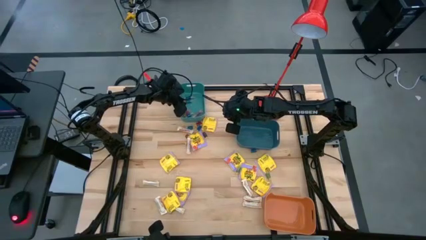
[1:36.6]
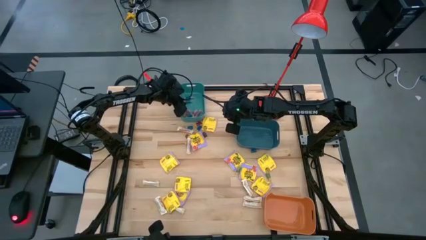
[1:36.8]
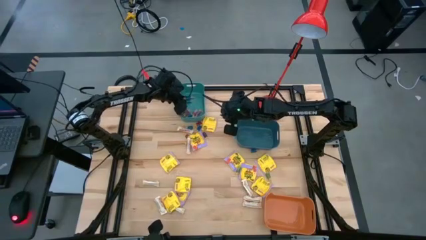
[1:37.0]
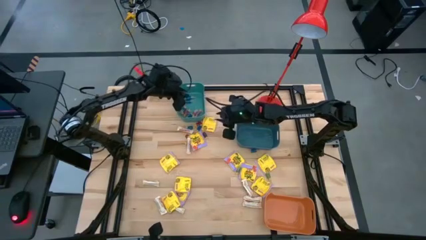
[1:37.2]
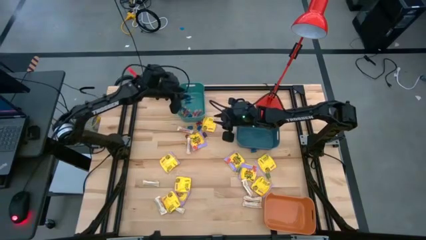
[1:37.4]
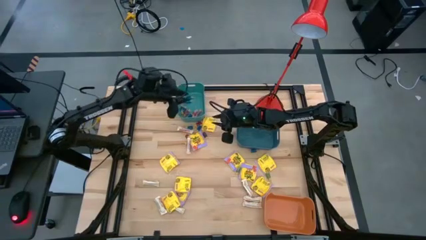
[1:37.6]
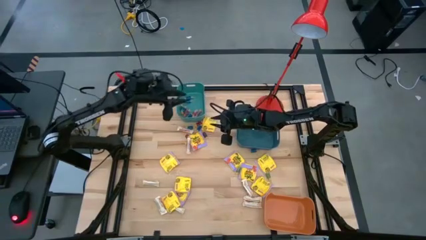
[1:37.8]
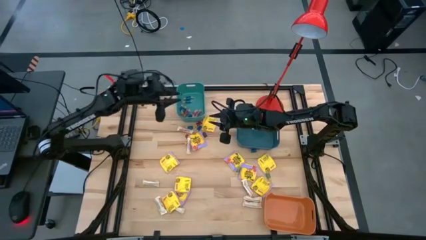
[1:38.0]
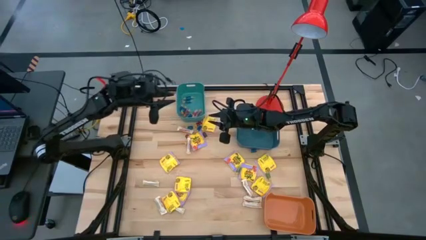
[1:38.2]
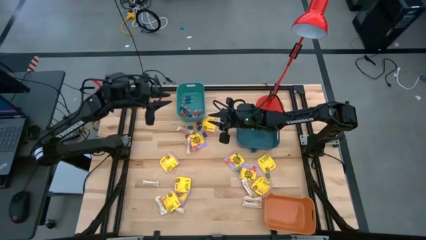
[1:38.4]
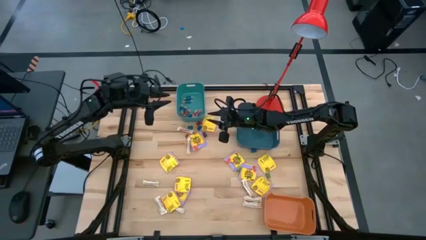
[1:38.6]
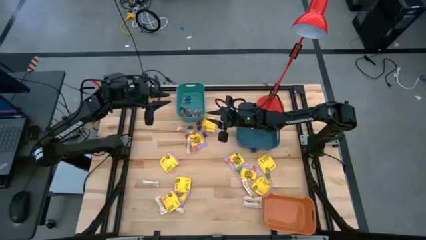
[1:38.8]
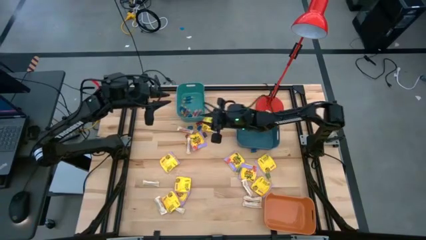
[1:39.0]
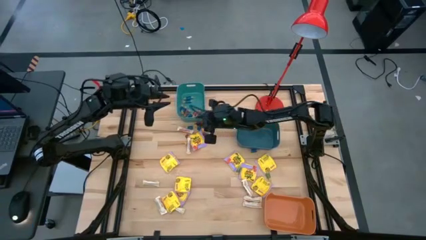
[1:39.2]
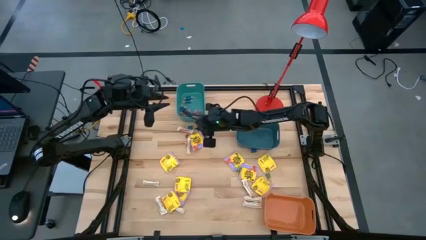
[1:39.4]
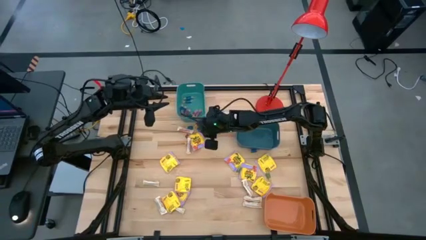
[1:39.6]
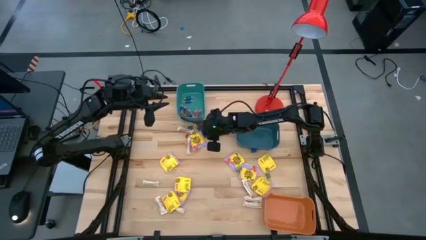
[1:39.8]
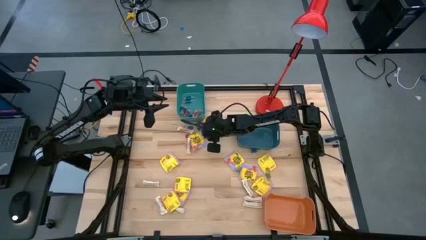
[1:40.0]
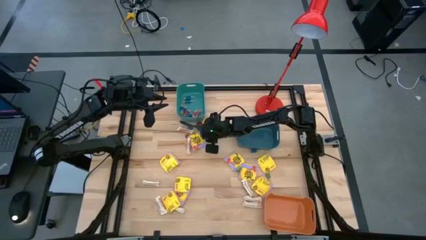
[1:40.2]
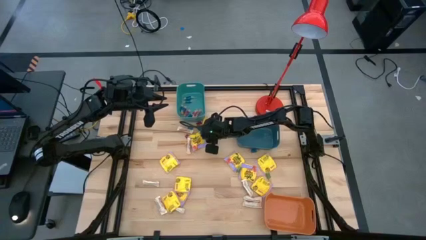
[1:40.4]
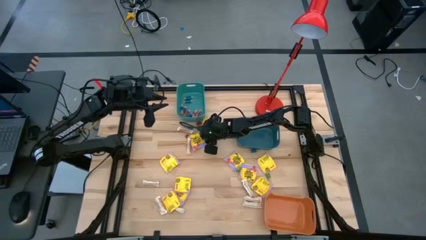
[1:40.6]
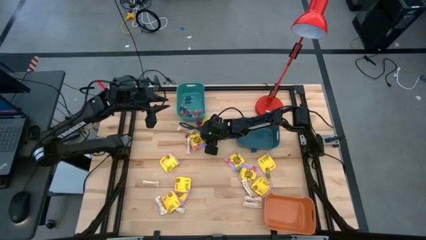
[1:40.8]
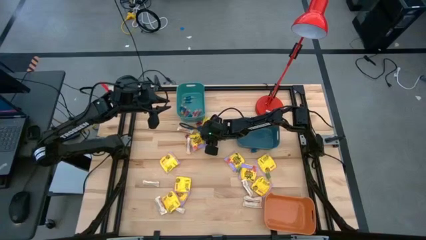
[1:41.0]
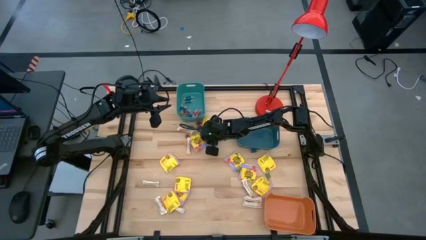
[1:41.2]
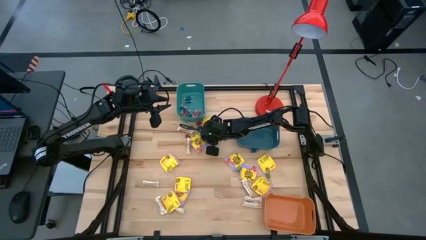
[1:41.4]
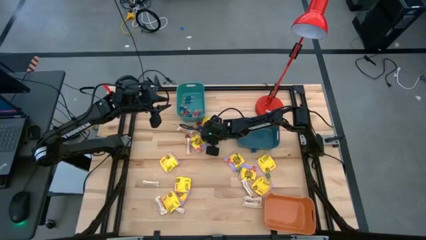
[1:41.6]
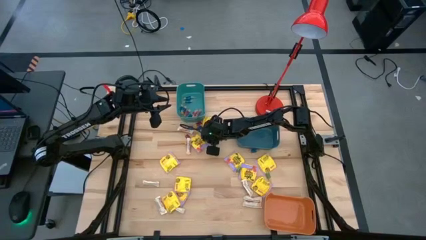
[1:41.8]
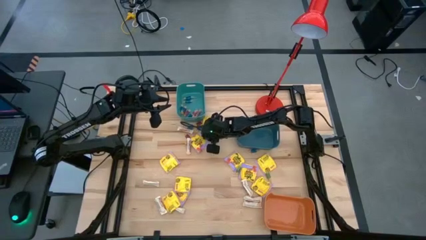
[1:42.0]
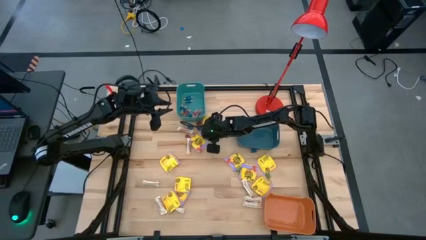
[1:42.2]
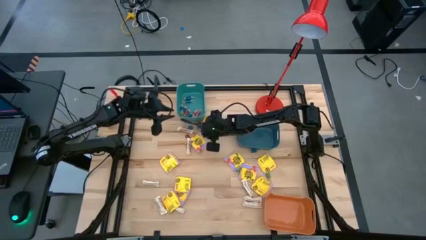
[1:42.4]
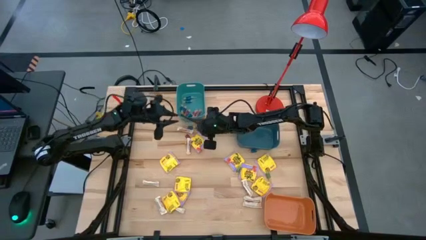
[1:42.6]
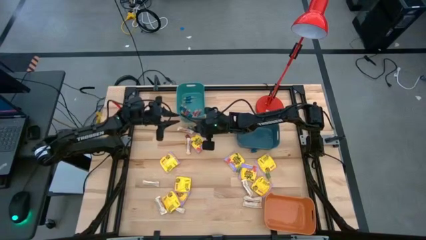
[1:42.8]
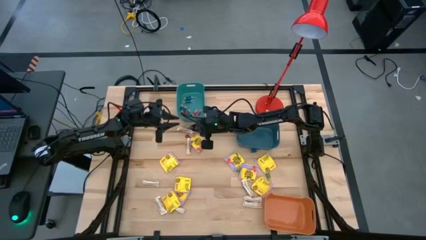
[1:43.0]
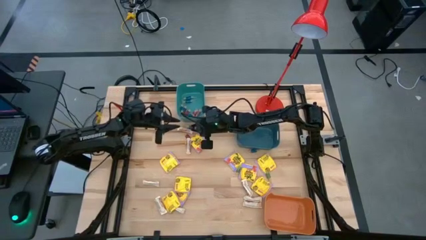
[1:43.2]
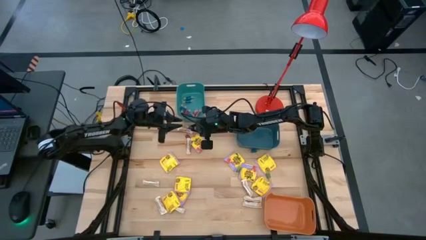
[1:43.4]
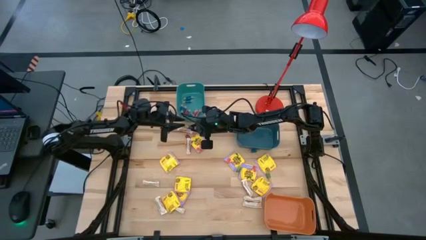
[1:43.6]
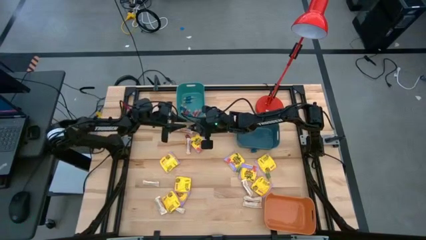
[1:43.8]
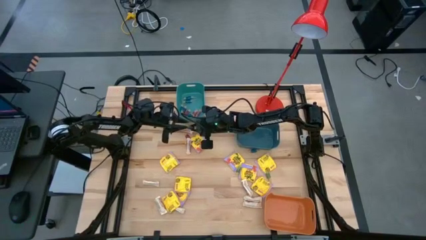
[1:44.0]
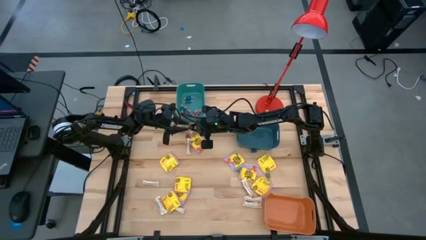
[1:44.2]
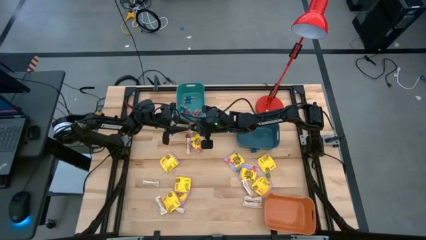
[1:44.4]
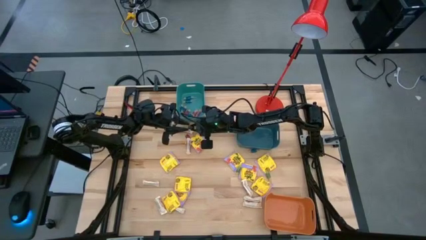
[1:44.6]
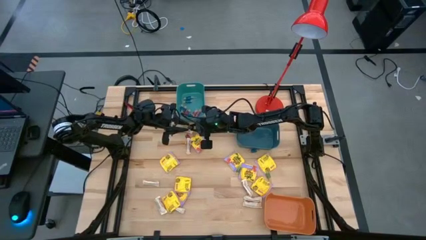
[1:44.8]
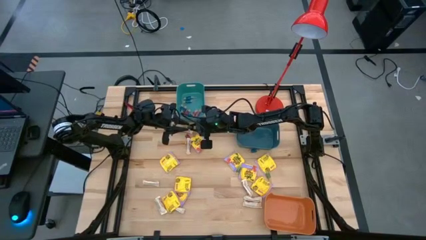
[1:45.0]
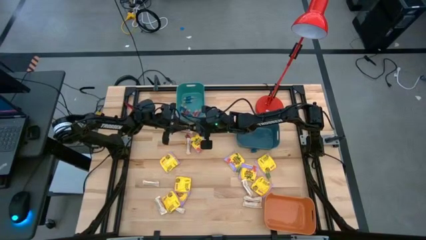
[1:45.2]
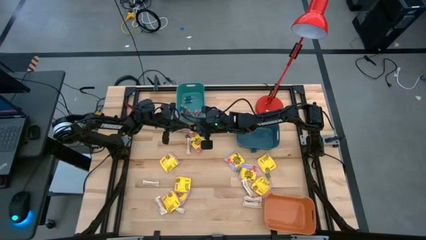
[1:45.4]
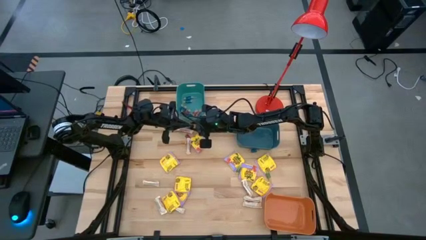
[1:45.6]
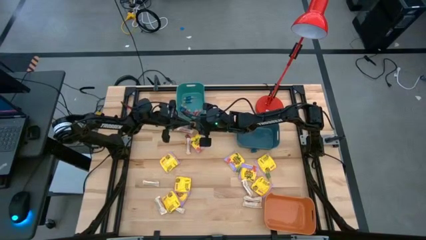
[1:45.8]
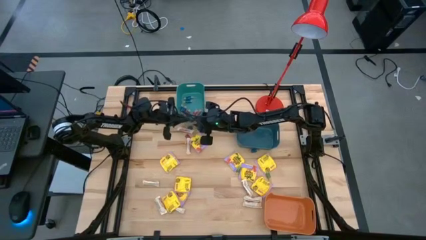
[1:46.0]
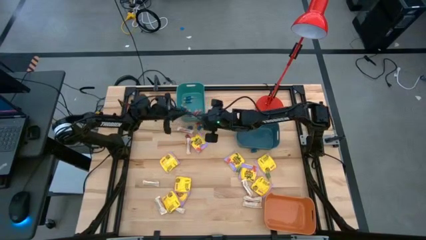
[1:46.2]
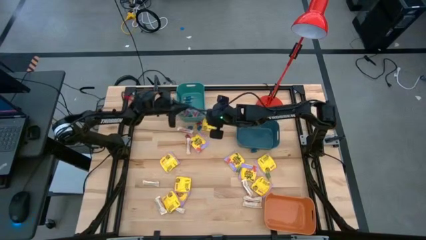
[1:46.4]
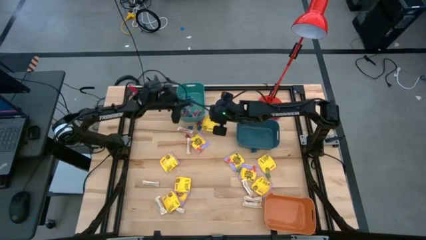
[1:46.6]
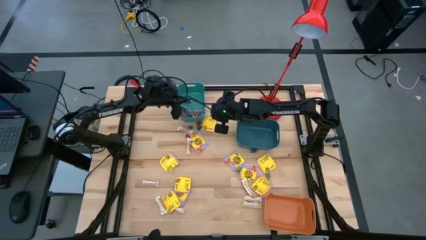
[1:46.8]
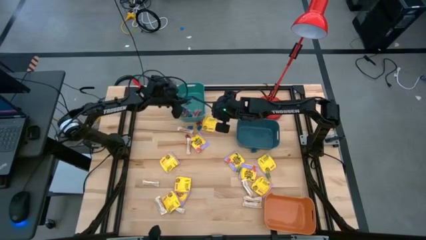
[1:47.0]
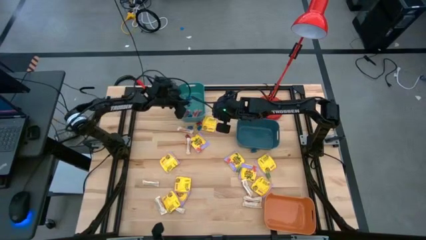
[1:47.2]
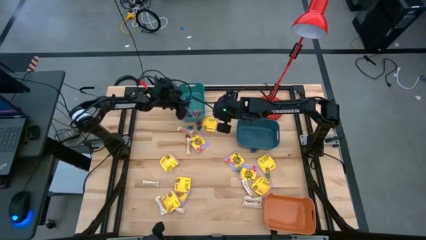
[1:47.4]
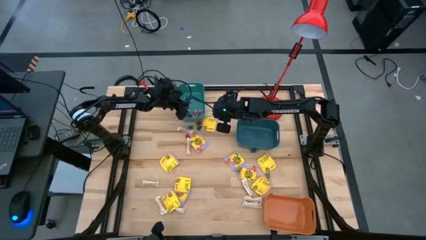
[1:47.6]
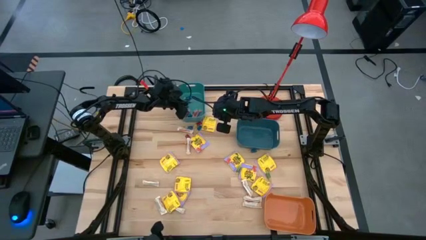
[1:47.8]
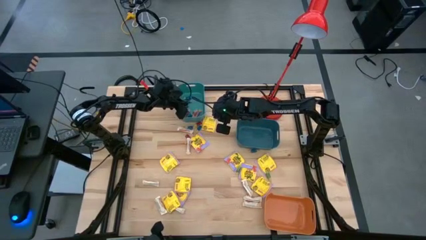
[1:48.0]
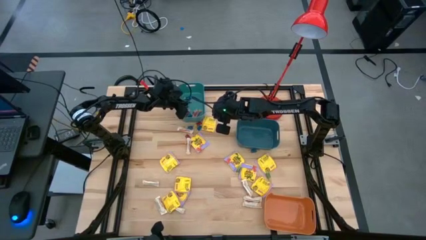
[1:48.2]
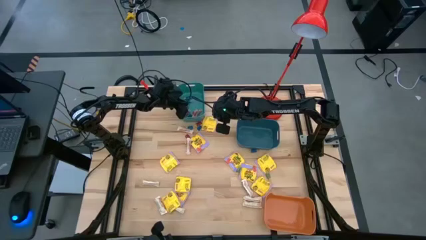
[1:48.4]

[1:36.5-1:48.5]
Task: Sort candy
Put the violet candy into the green bin
